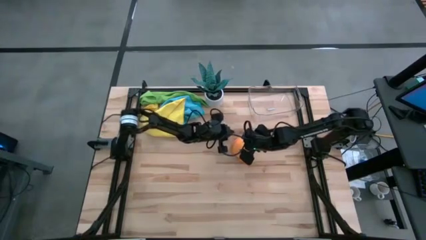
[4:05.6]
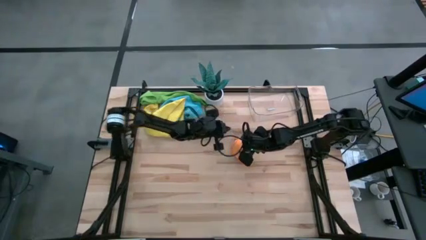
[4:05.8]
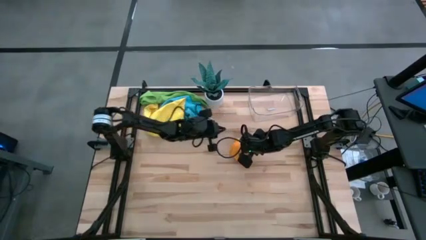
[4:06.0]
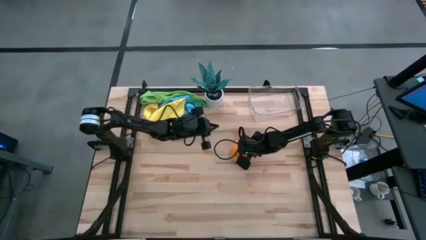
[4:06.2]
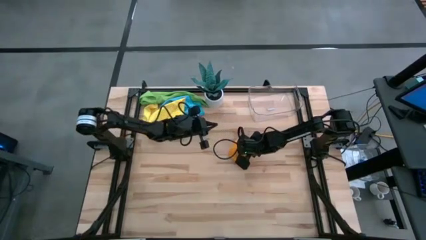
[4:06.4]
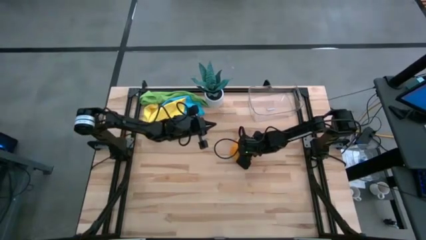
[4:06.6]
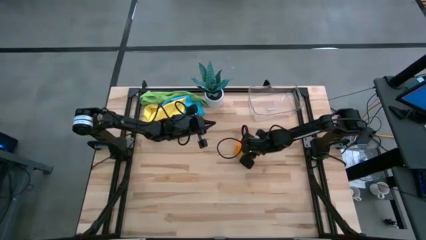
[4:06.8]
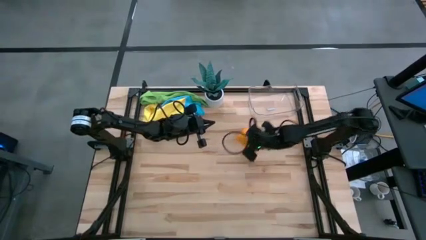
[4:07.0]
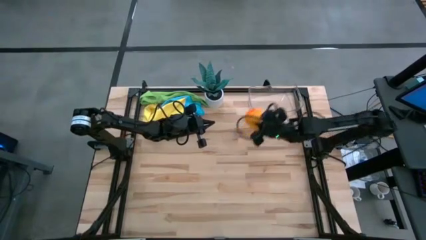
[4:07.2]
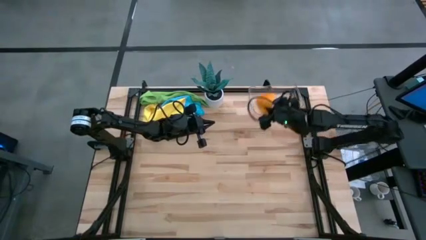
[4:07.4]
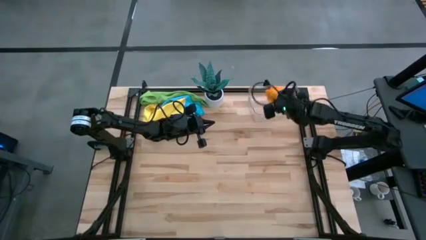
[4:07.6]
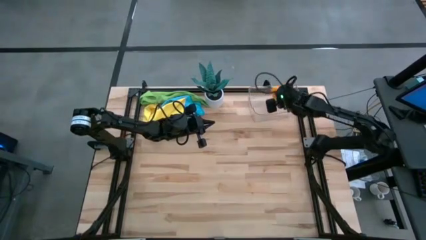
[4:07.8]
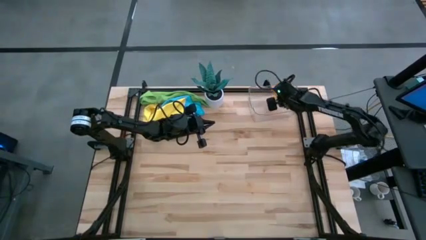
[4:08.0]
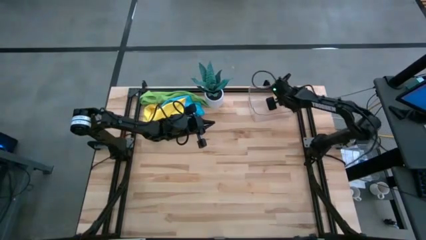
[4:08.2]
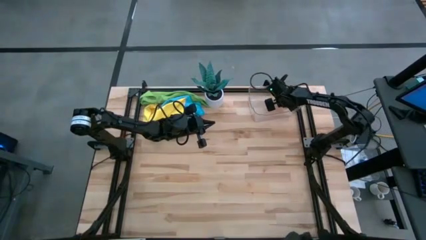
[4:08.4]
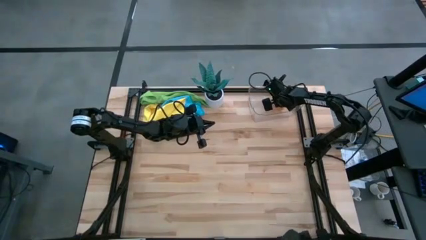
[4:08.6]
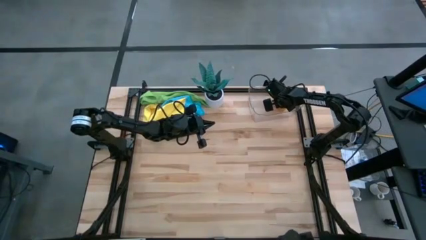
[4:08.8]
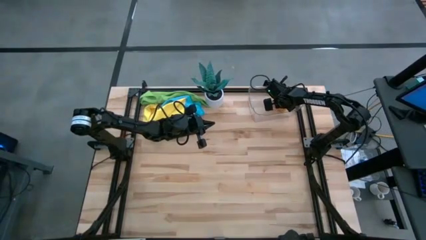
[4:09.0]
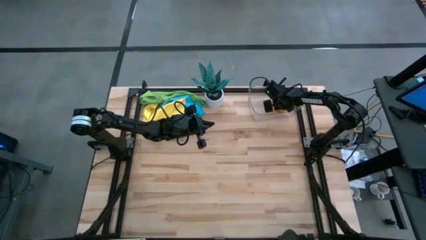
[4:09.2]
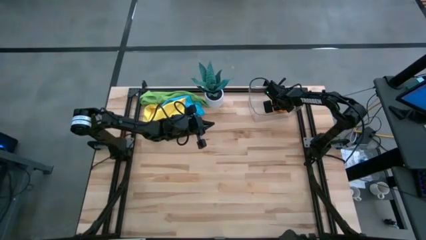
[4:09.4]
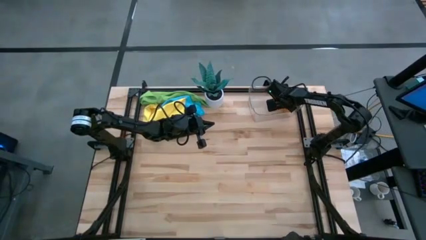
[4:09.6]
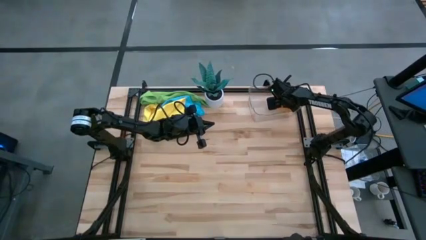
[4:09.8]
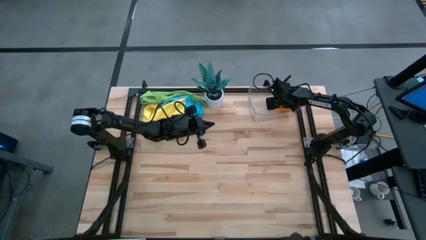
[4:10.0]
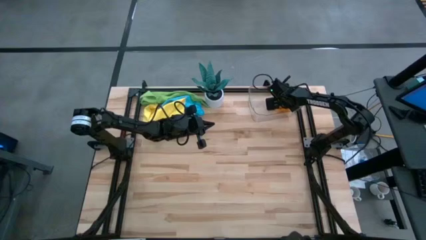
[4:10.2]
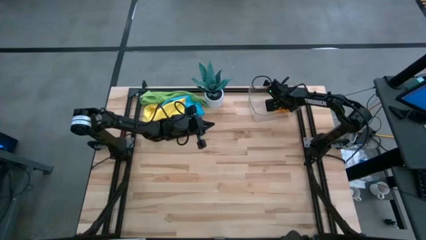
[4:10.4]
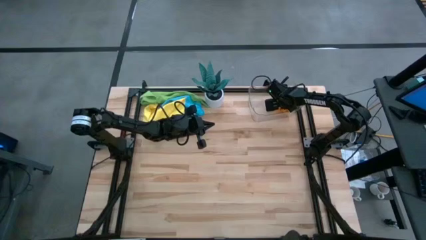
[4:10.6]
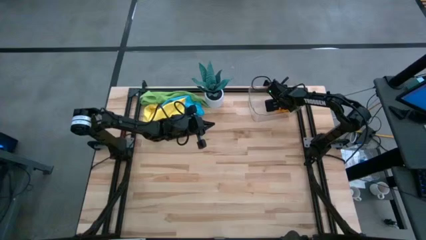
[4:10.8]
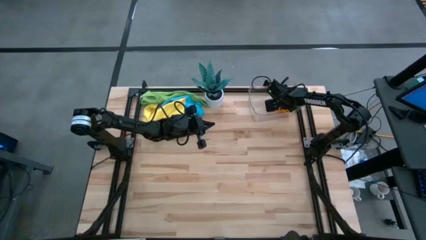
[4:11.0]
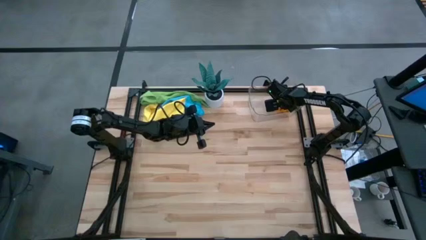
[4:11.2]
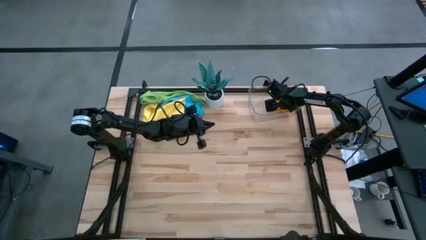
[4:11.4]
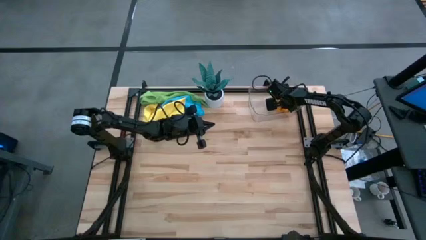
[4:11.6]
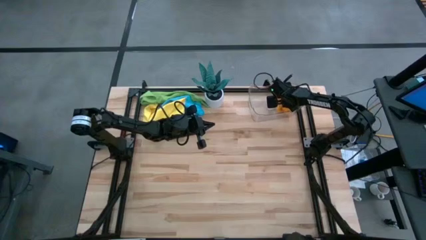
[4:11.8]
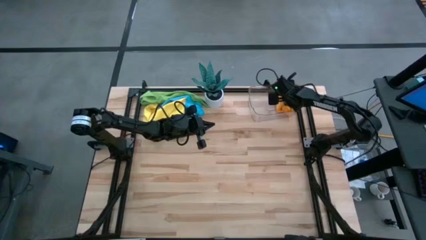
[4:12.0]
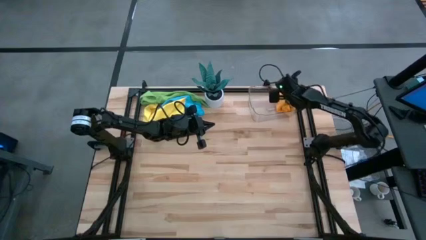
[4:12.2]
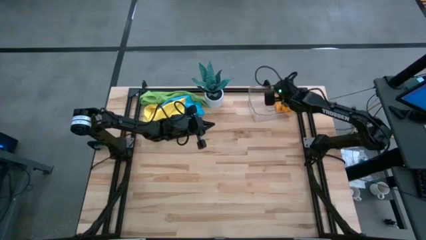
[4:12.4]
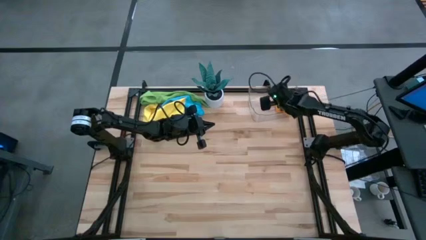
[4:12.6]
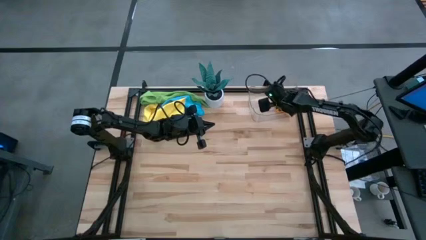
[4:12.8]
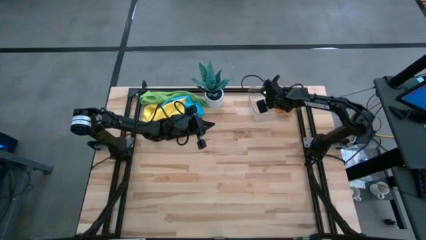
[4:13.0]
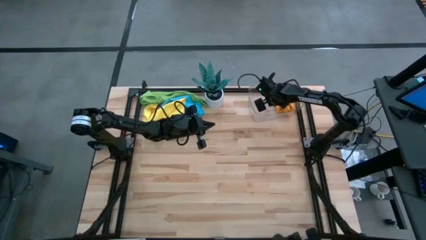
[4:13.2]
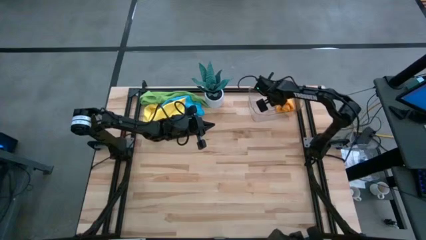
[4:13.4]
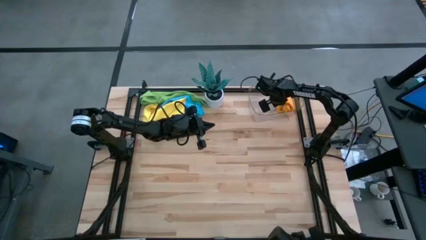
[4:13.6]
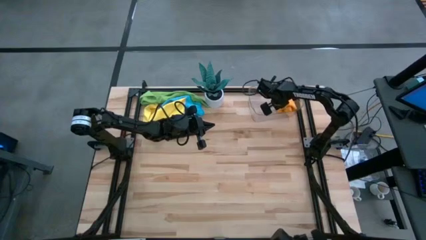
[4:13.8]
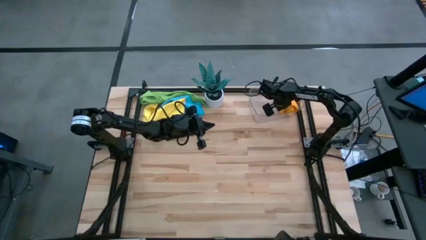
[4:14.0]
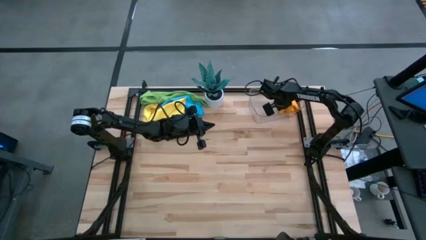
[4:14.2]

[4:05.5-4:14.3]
Task: Roll microfiber towels into tight, uniform cylinder then place into a basket
Put the orange microfiber cloth into the transparent bin

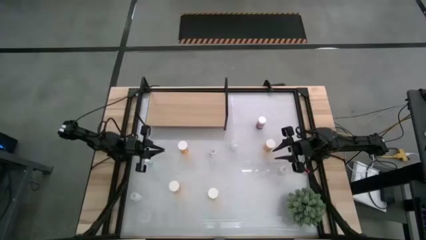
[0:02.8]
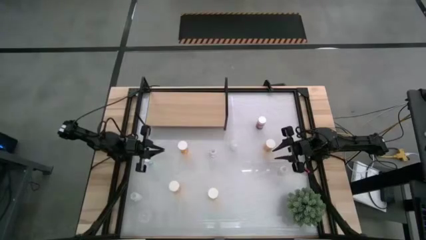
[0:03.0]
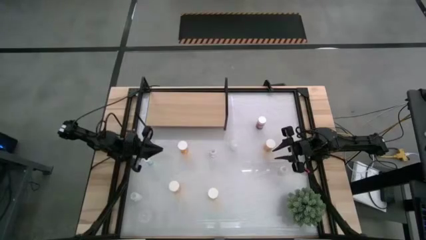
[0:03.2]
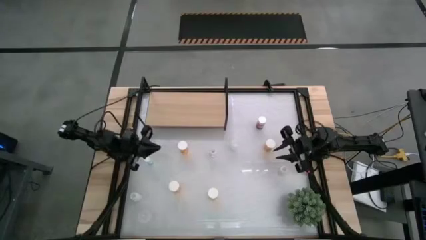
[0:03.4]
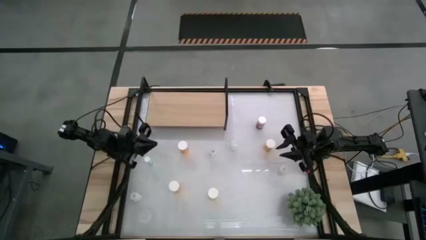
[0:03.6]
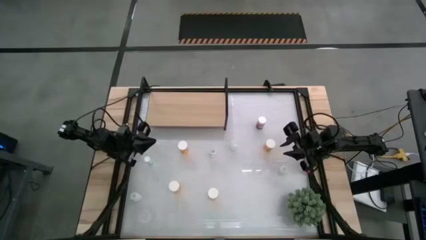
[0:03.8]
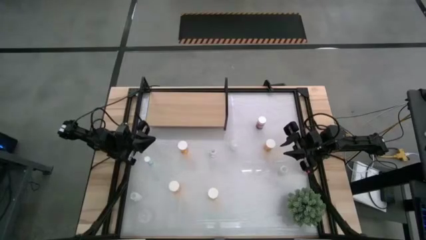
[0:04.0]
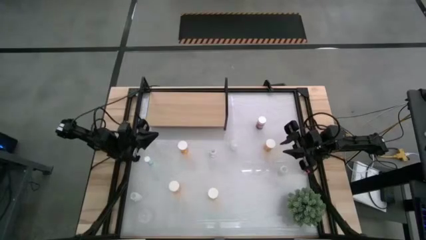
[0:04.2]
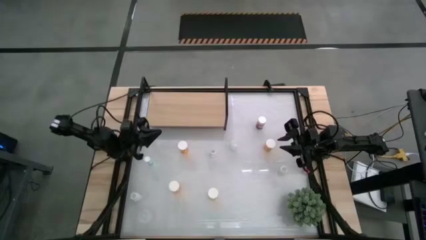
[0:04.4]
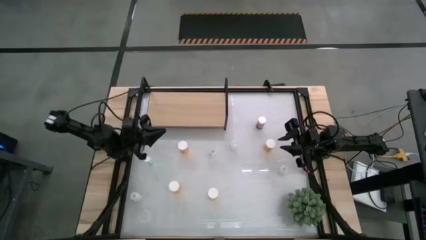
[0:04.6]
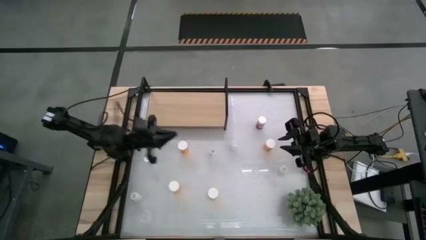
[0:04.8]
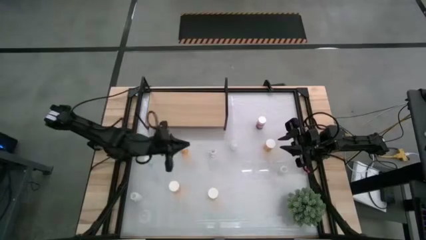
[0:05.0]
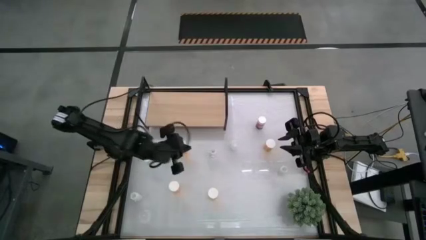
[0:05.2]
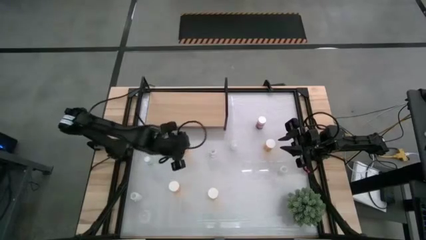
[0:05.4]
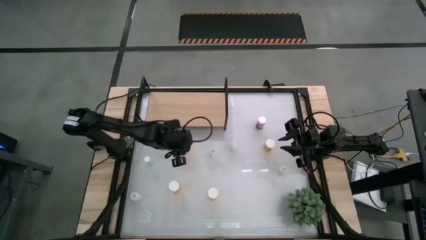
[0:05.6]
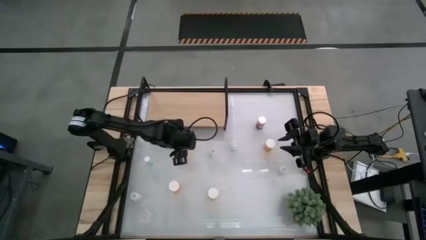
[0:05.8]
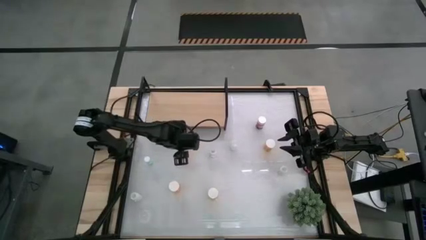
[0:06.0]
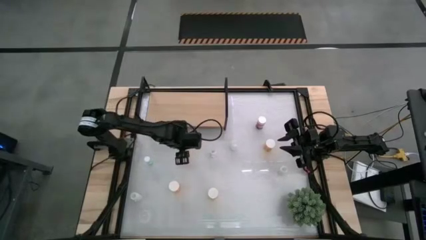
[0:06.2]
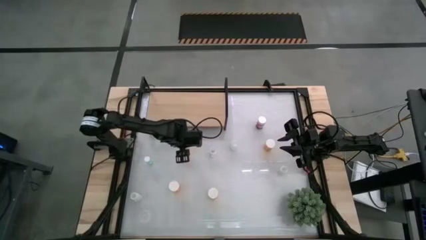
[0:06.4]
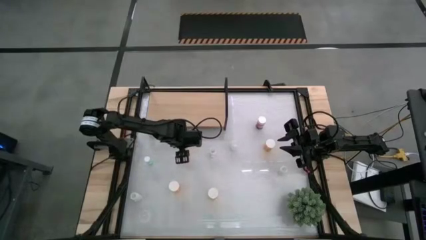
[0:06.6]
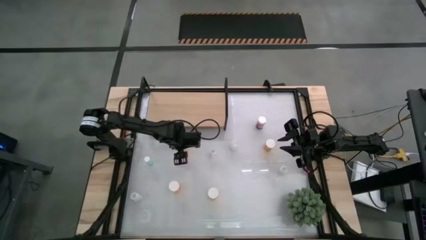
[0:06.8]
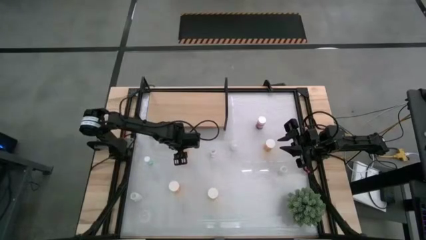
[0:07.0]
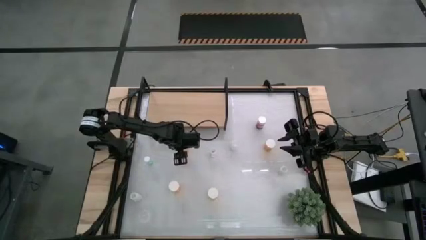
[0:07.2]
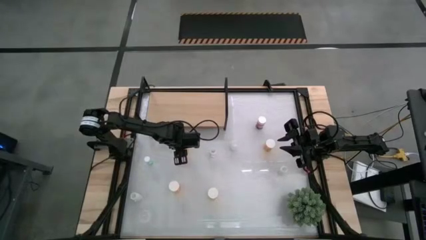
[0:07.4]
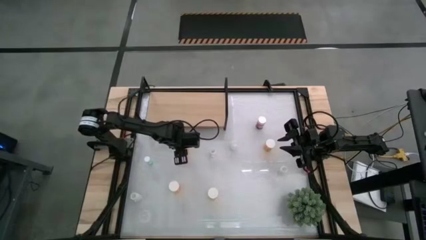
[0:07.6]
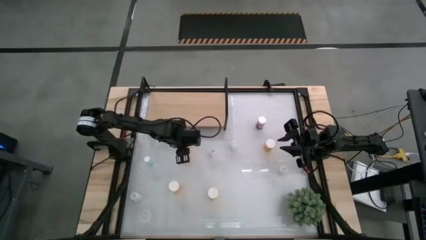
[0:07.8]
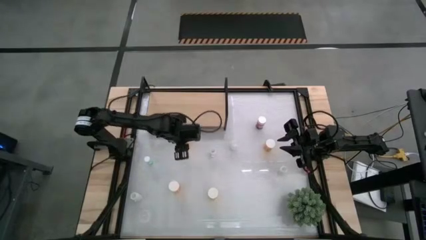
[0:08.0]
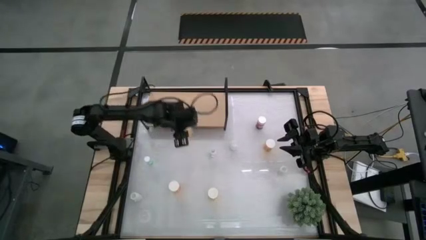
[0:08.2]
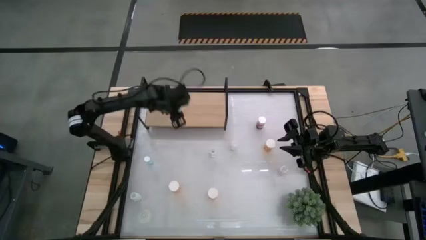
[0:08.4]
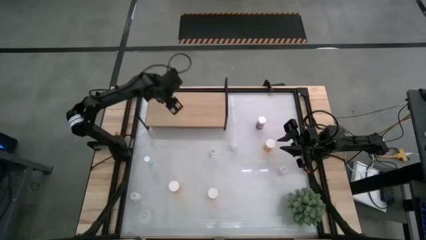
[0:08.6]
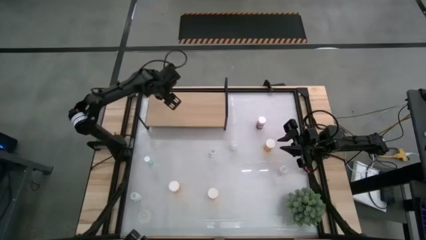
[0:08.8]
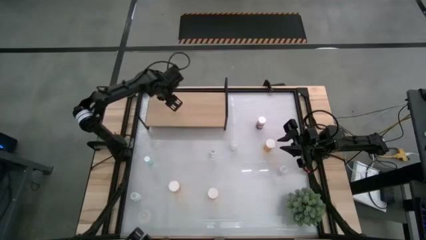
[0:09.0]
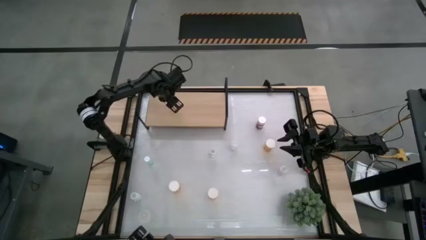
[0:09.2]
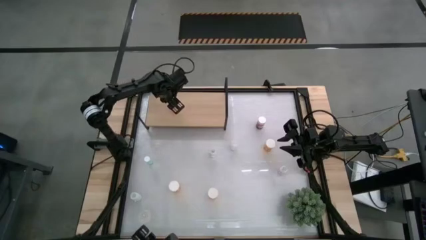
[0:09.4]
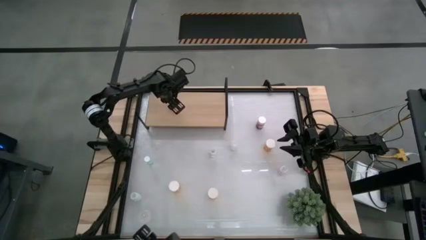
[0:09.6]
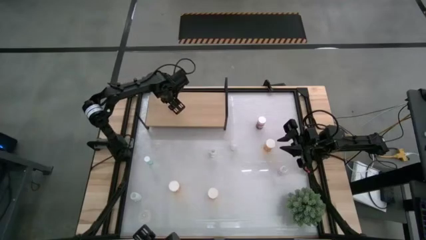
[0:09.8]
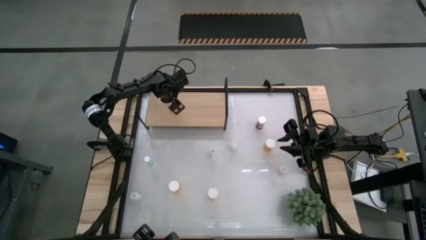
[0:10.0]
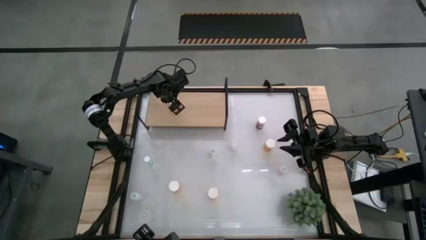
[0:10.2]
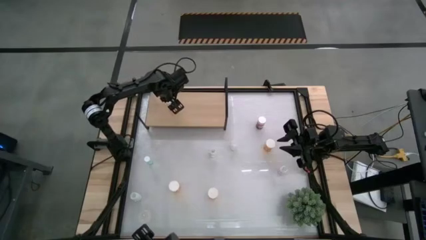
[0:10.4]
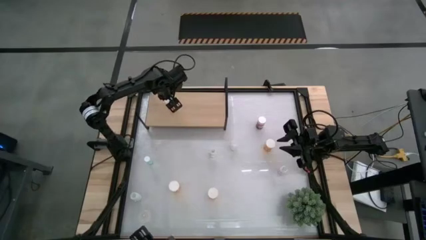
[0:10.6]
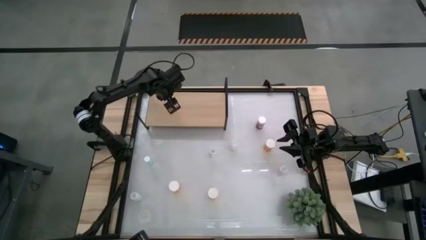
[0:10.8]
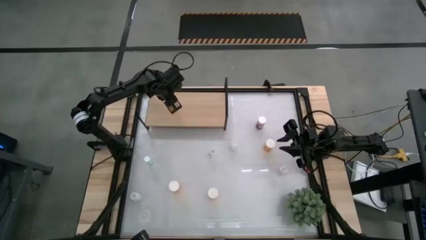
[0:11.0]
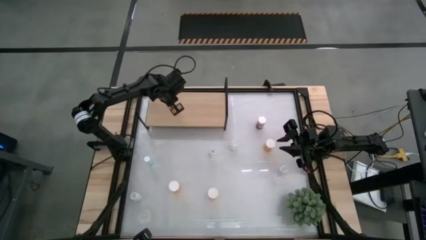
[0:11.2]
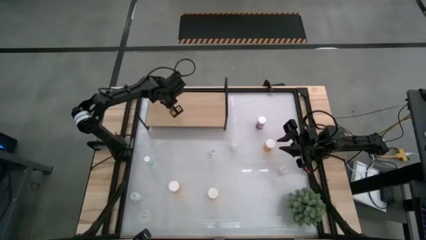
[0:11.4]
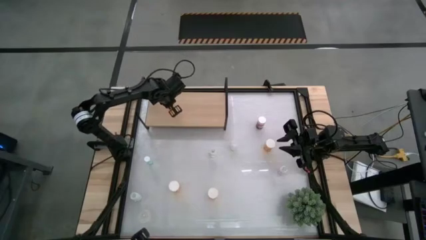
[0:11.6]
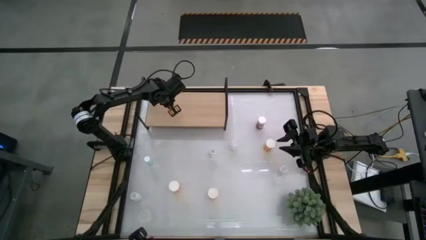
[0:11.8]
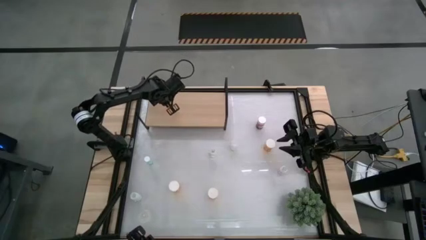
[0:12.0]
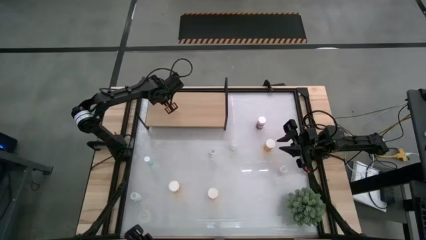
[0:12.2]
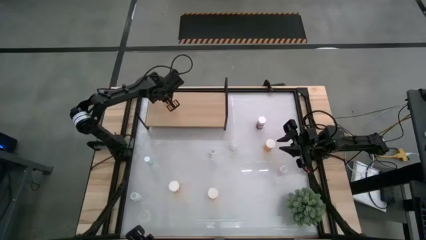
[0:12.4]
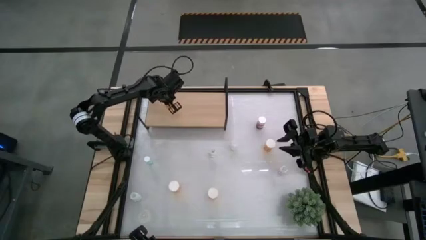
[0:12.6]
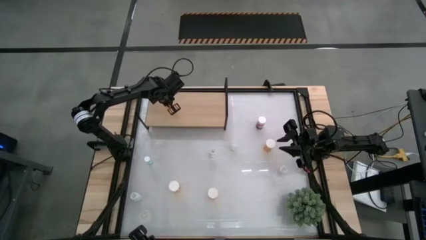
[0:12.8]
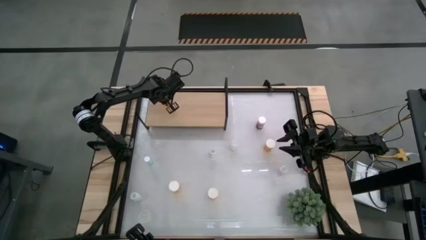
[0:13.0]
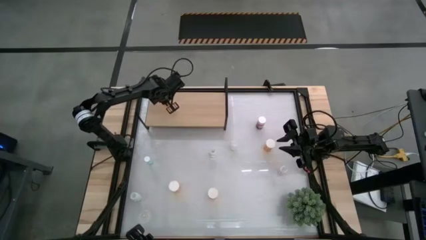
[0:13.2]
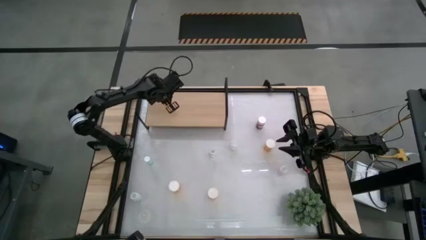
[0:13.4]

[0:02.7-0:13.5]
Task: Pick and place medicine bottles onto shelf by color
Put the middle left large yellow pill bottle on the shelf
